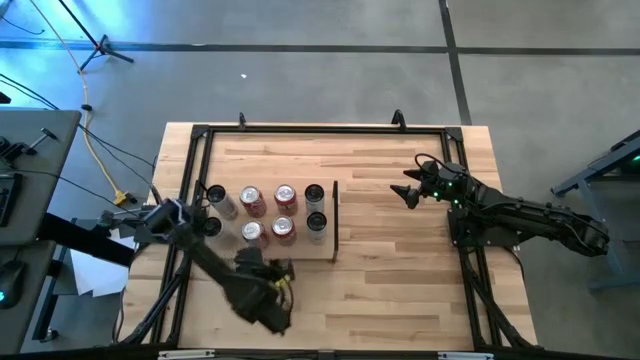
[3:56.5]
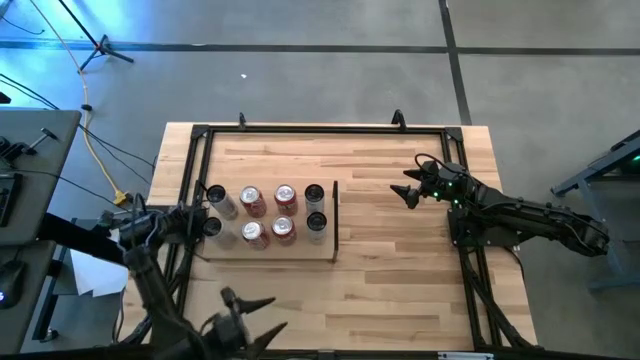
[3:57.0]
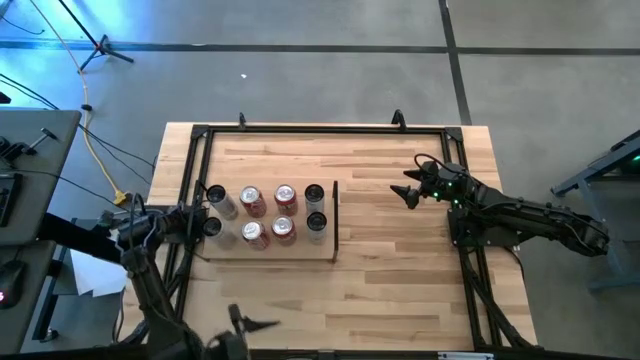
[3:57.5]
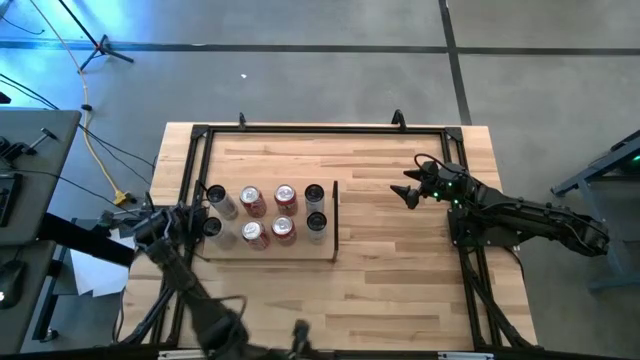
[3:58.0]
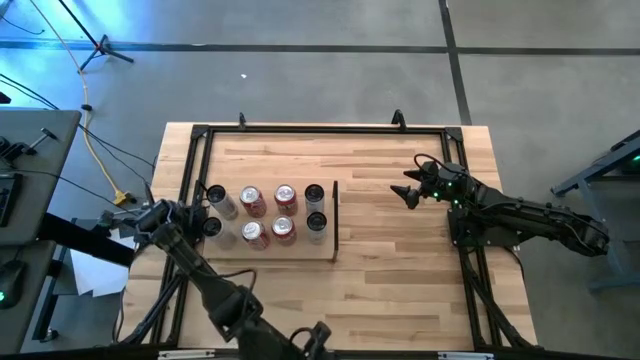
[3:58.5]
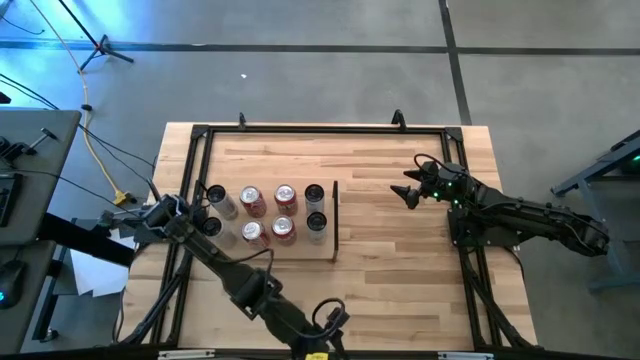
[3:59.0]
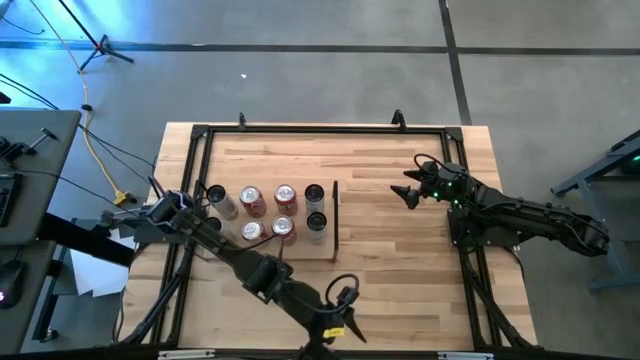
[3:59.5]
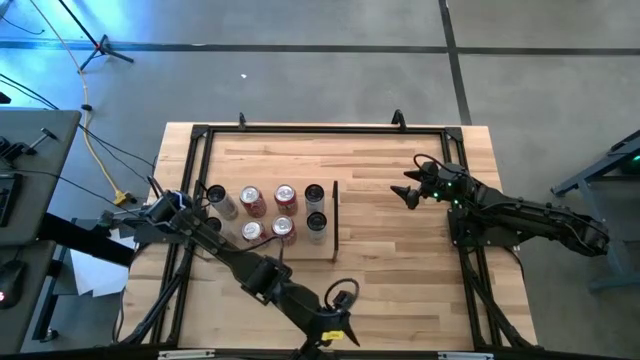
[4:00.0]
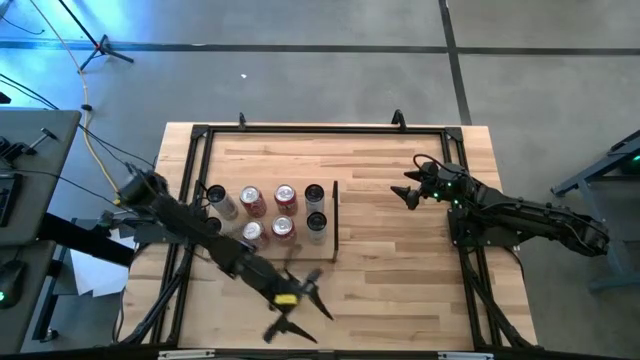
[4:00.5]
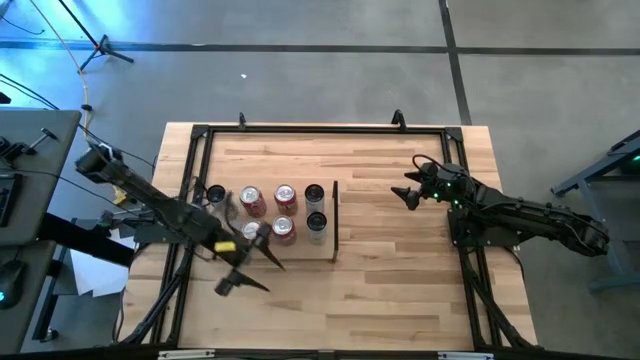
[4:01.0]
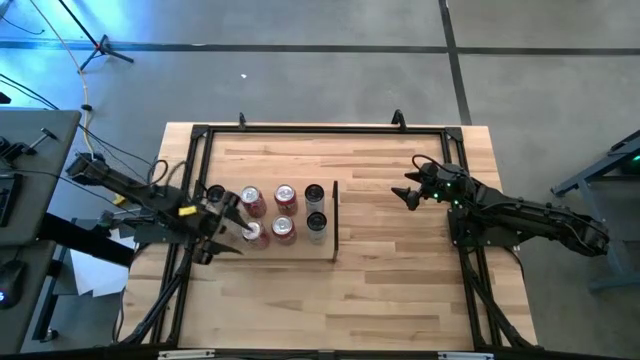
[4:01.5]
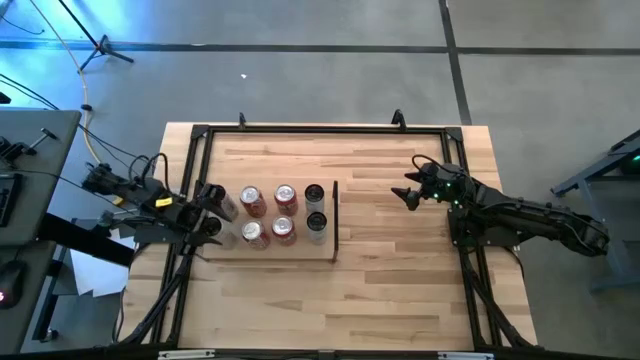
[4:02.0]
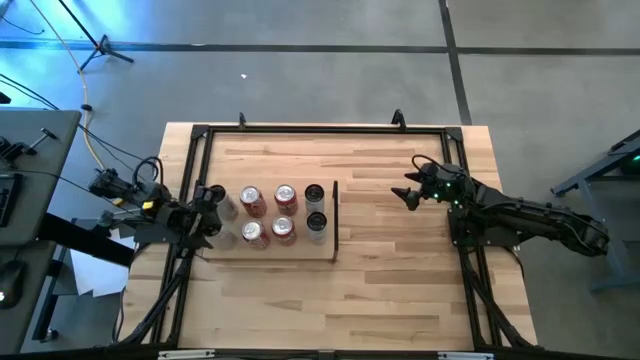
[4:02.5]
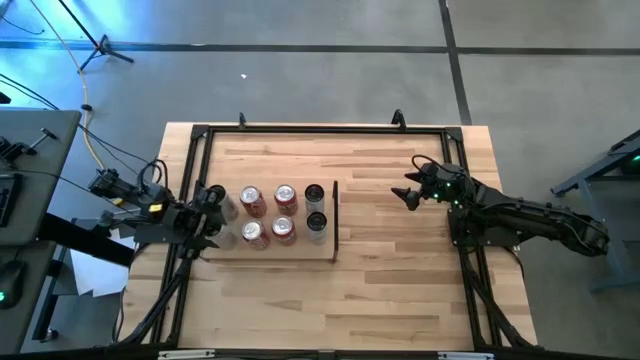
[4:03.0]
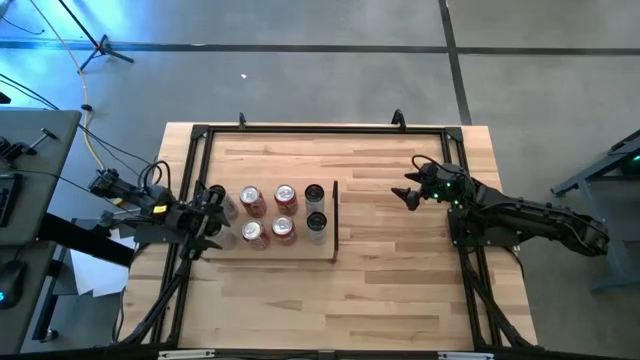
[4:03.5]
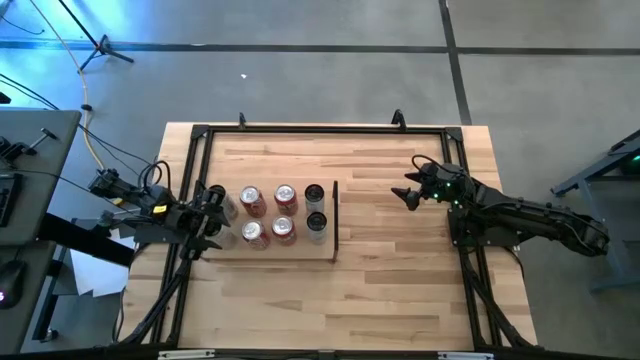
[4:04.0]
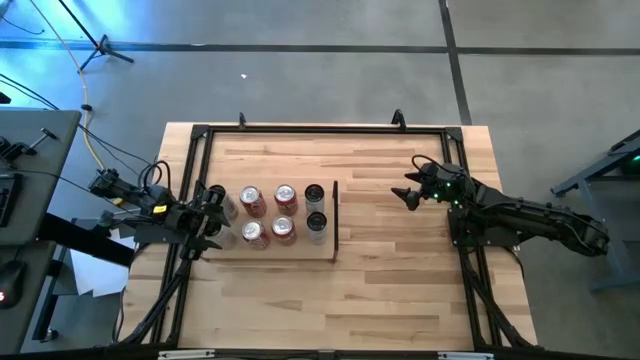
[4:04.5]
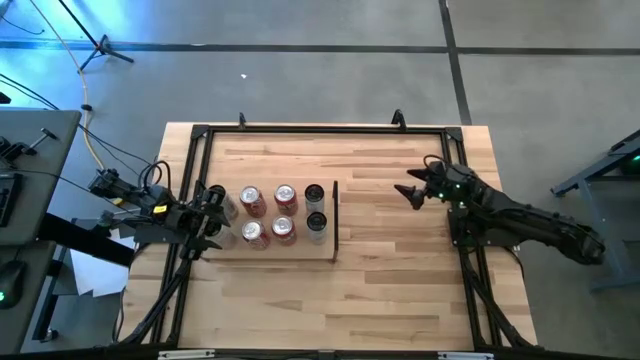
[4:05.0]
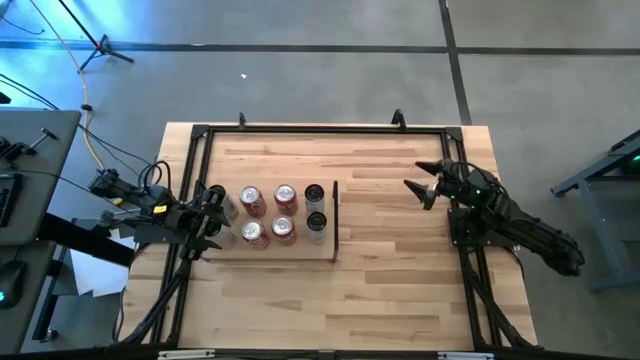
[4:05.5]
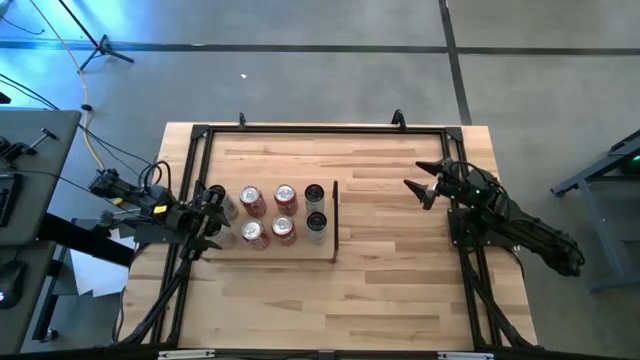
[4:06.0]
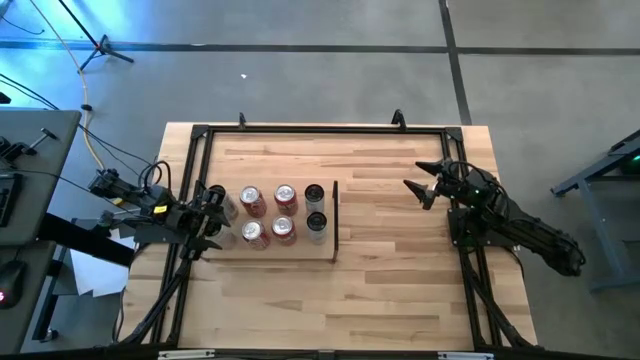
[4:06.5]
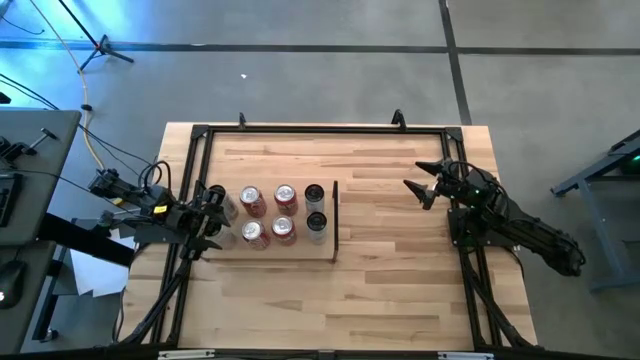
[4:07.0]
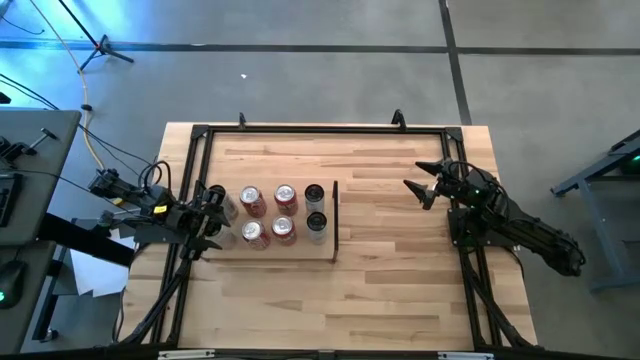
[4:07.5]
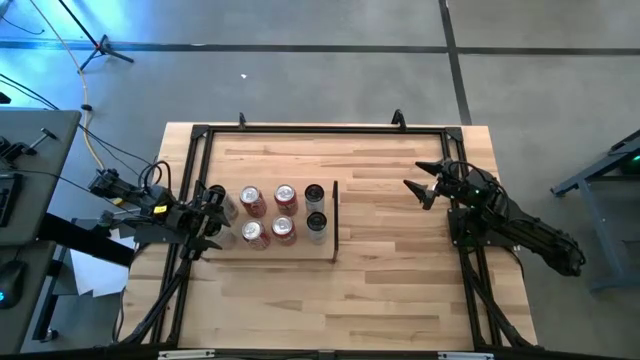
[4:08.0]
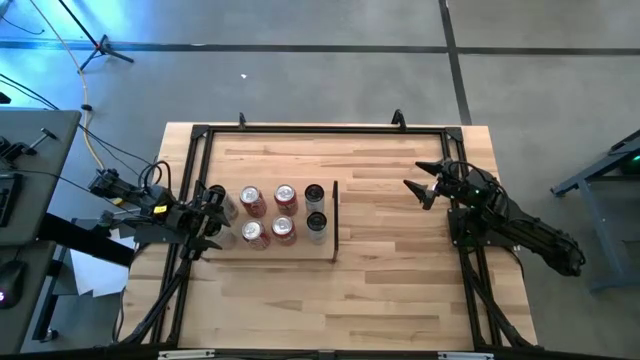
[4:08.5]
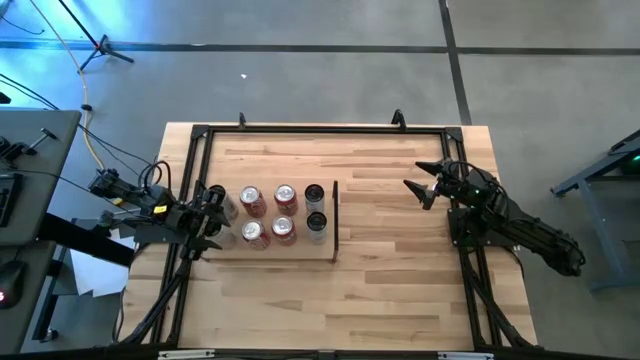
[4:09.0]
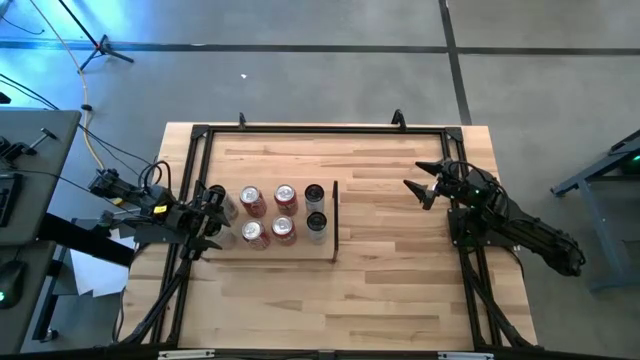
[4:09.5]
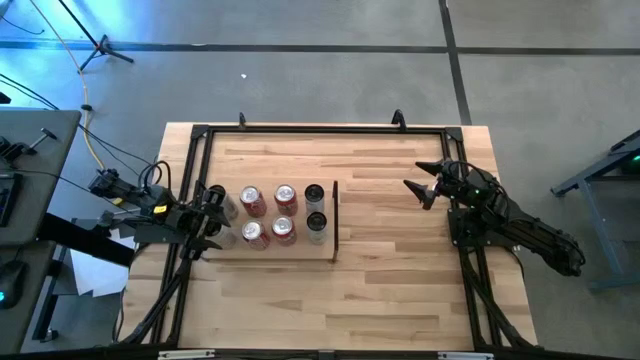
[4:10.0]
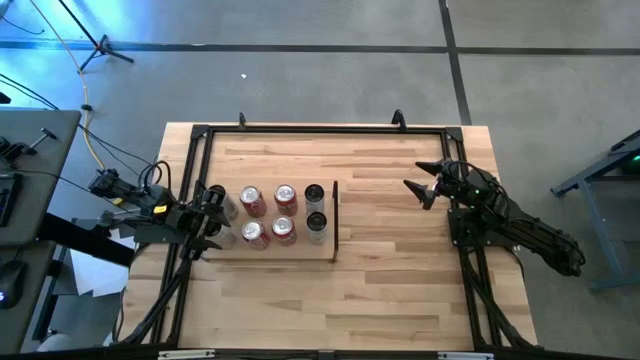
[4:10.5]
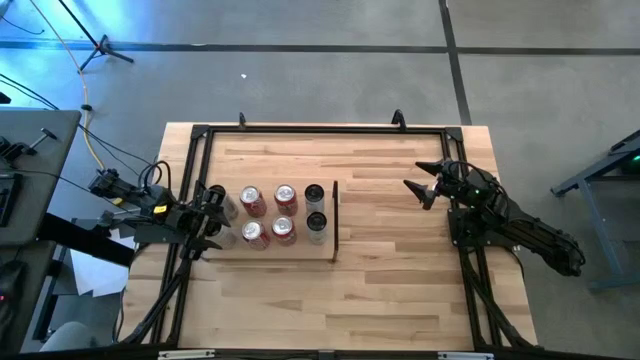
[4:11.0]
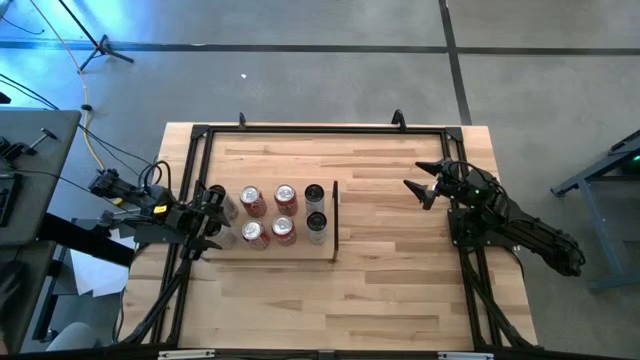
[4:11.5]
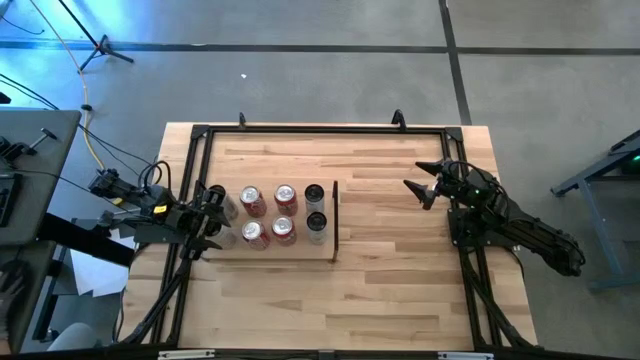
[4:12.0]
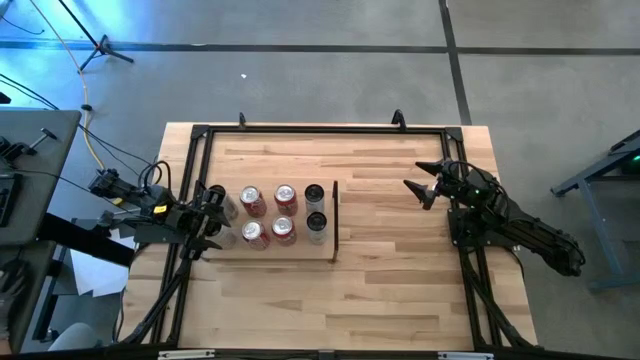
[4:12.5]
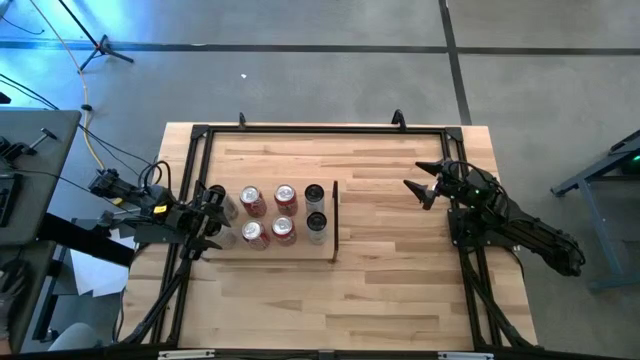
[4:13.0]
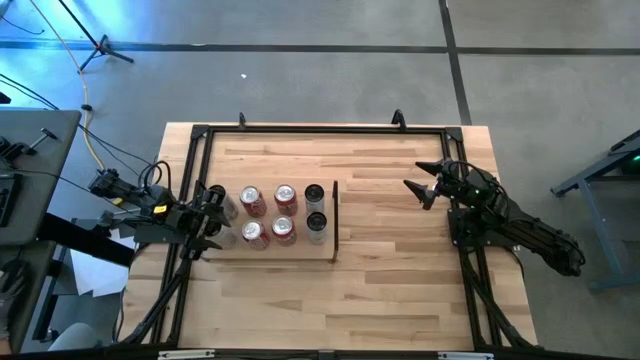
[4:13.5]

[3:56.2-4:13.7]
Task: Place canned beverage on shelf
Return to Home Position

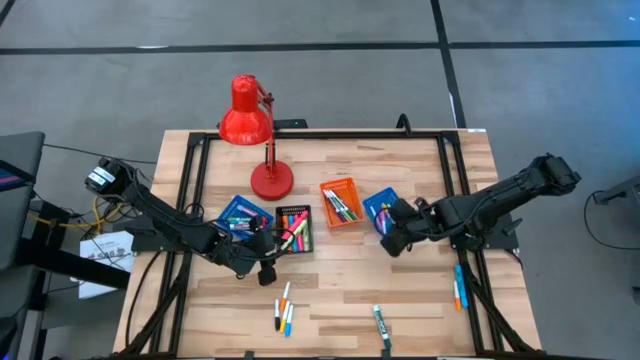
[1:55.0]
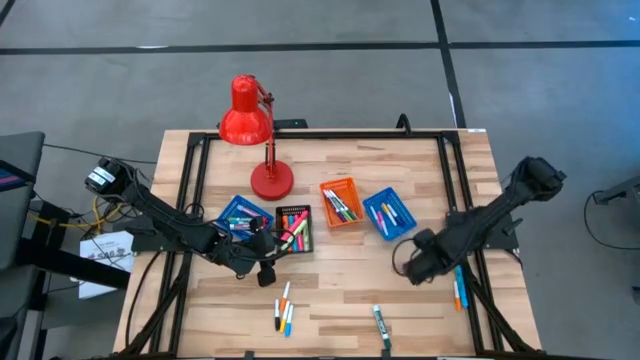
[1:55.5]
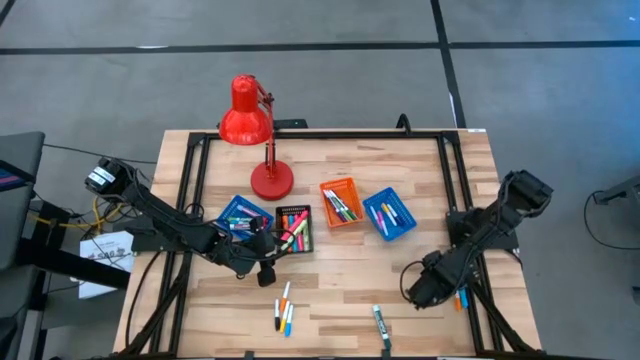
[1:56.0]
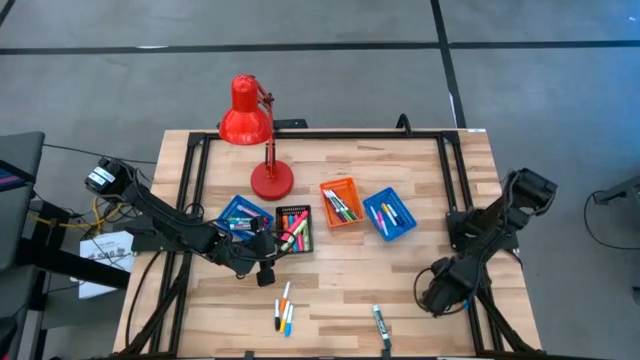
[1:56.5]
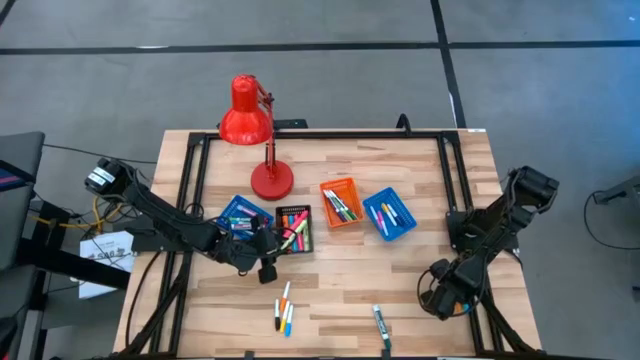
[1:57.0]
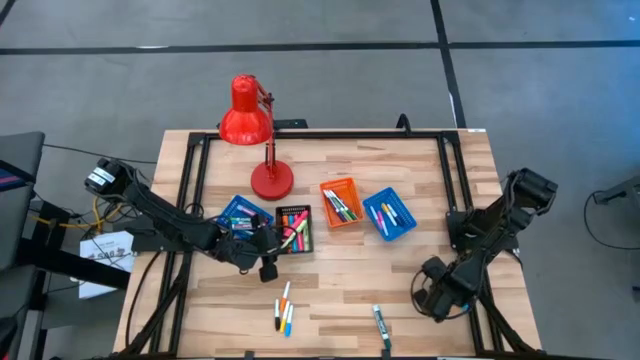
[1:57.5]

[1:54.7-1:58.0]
Task: Pick & Place Markers
Put the right small white and orange highlighter pen into the right blue basket

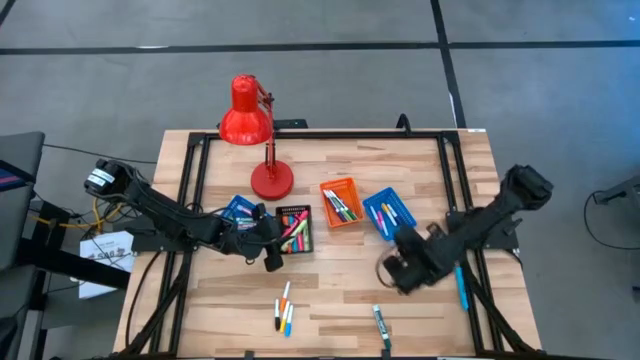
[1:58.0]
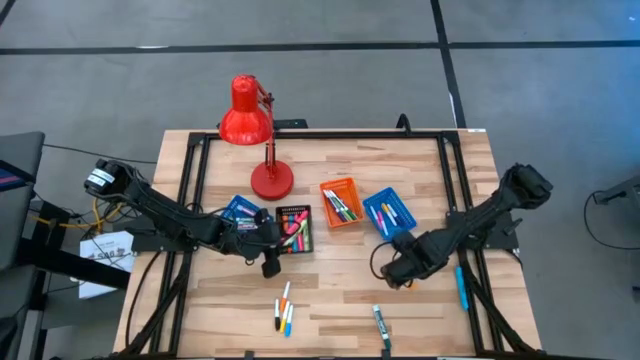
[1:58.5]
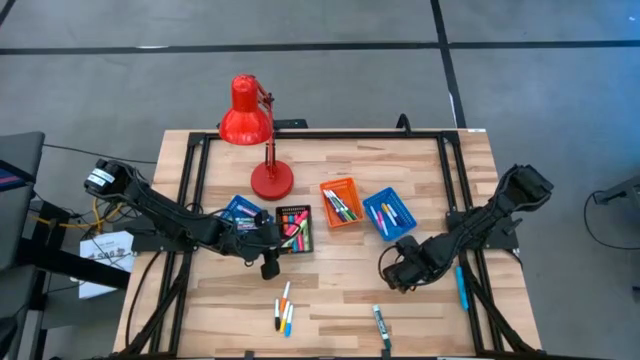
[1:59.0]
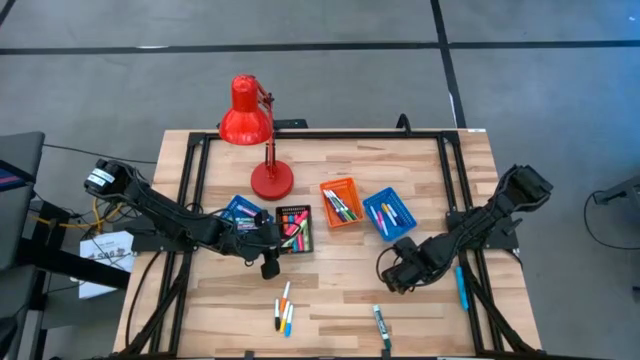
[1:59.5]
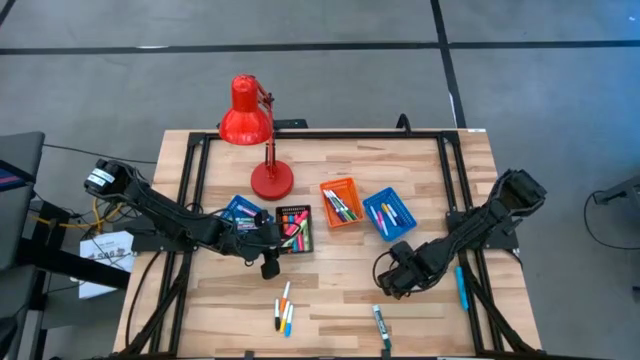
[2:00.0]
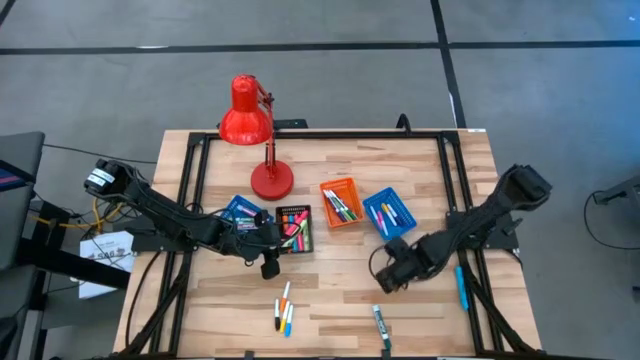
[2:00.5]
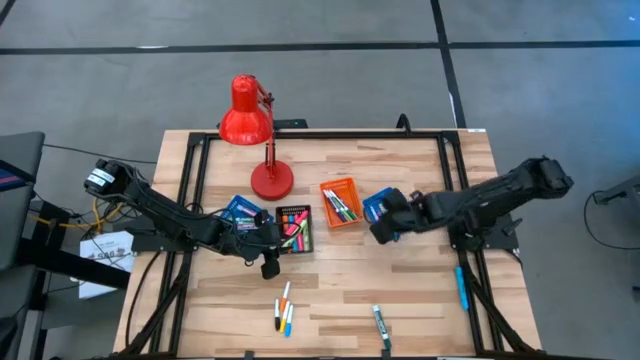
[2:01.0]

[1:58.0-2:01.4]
Put the right small white and orange highlighter pen into the right blue basket
